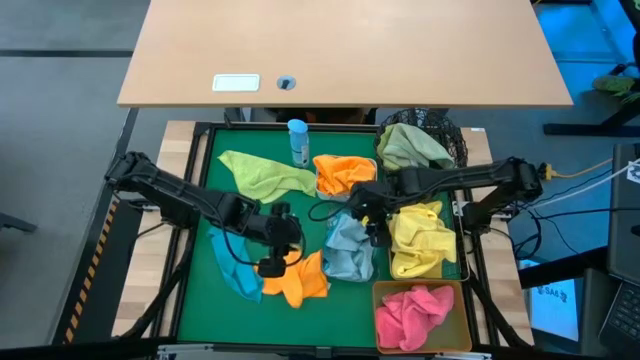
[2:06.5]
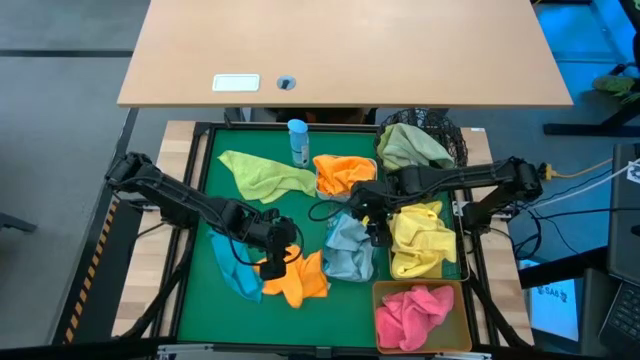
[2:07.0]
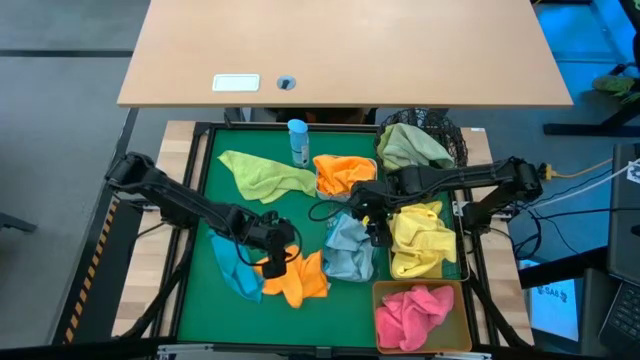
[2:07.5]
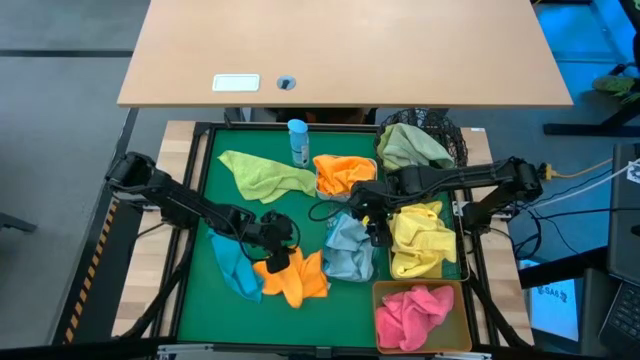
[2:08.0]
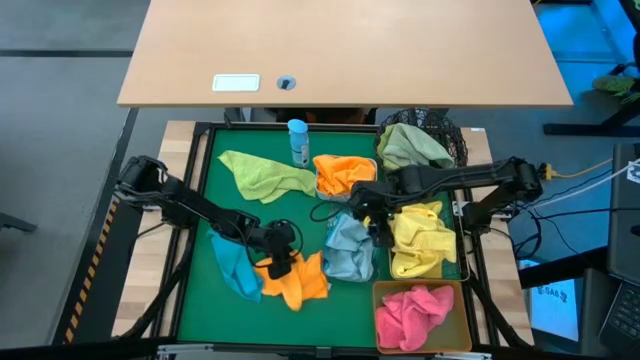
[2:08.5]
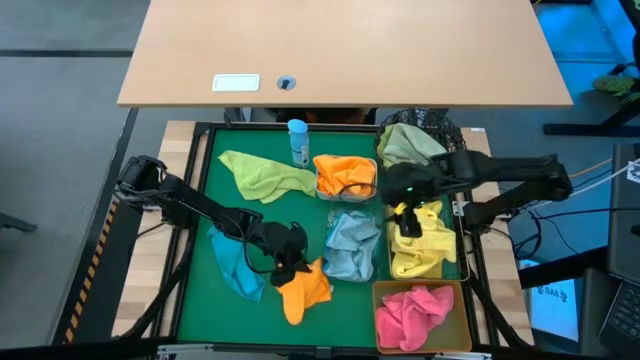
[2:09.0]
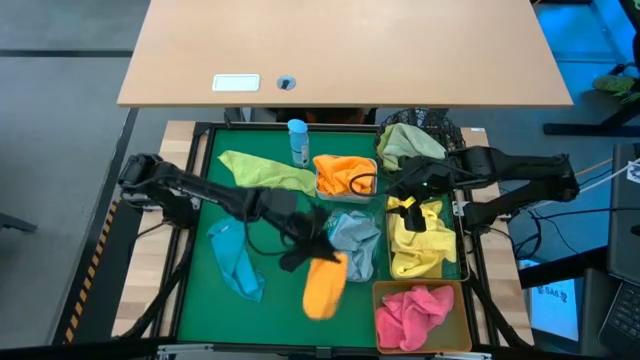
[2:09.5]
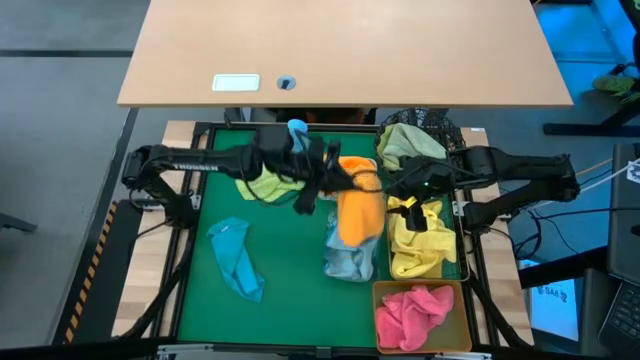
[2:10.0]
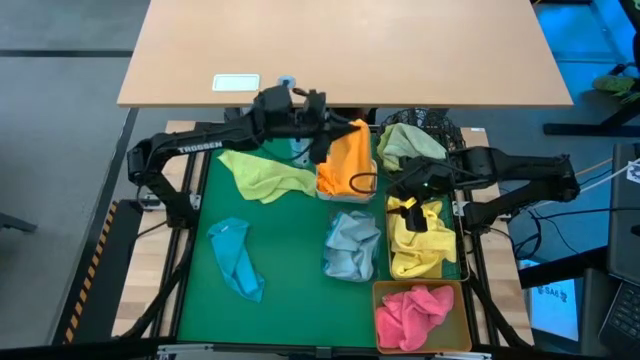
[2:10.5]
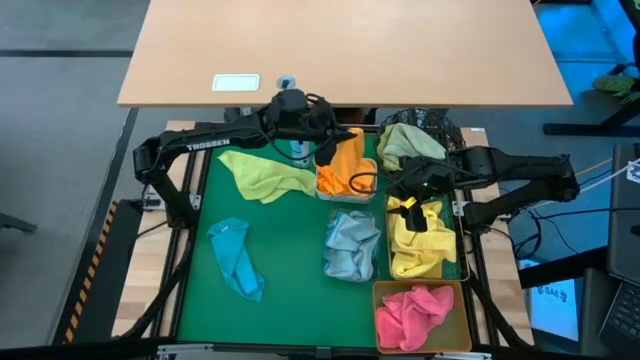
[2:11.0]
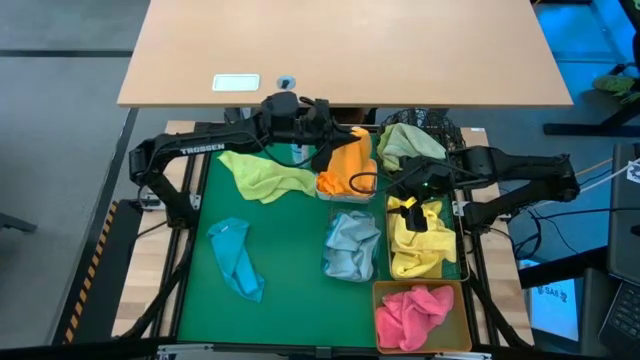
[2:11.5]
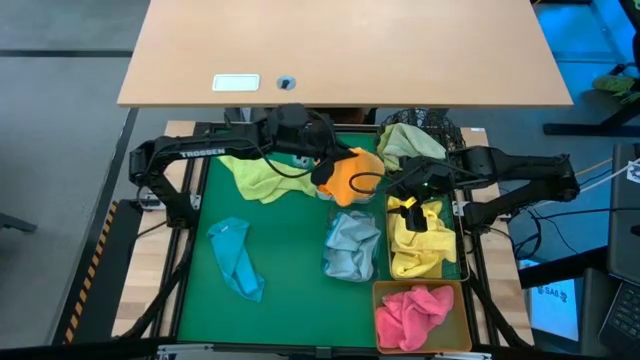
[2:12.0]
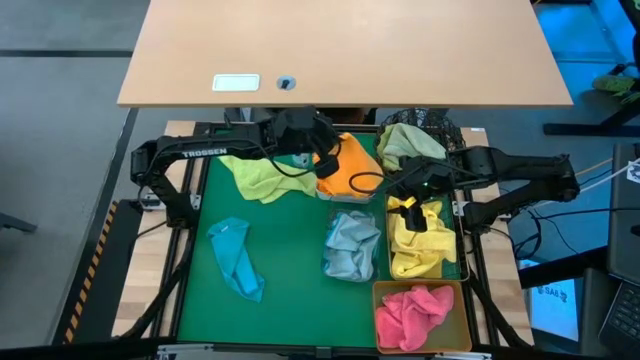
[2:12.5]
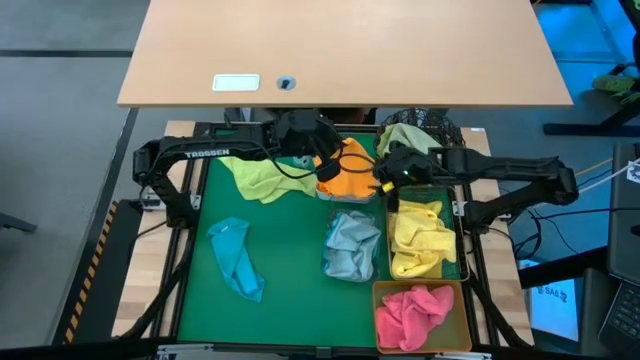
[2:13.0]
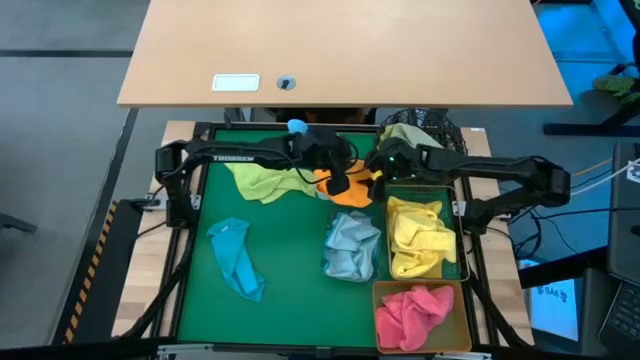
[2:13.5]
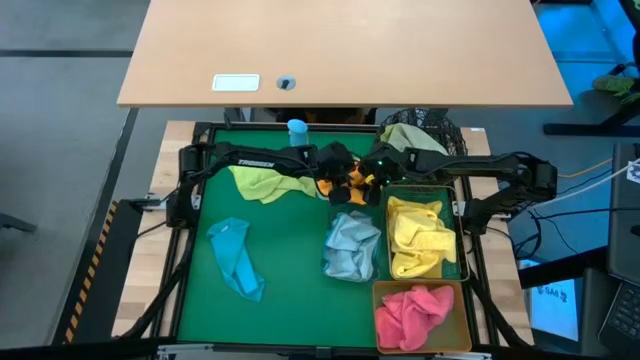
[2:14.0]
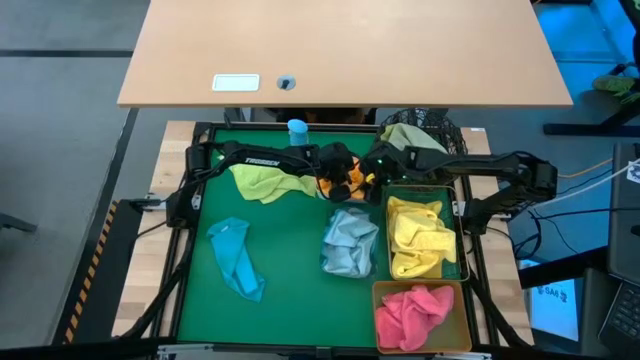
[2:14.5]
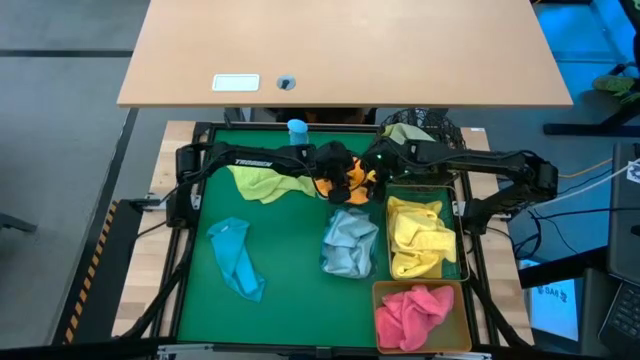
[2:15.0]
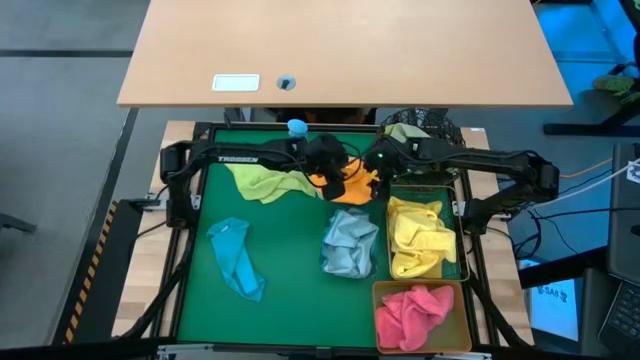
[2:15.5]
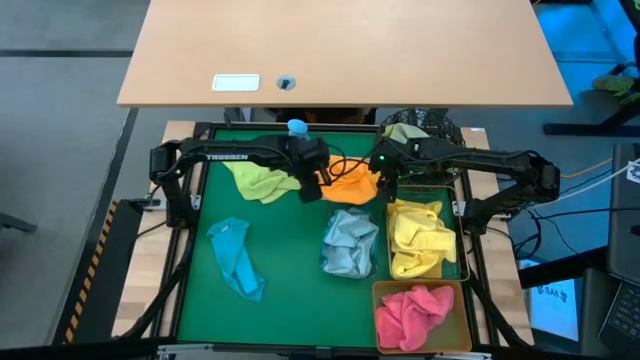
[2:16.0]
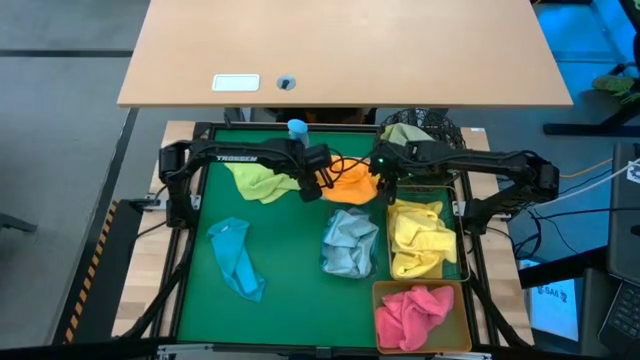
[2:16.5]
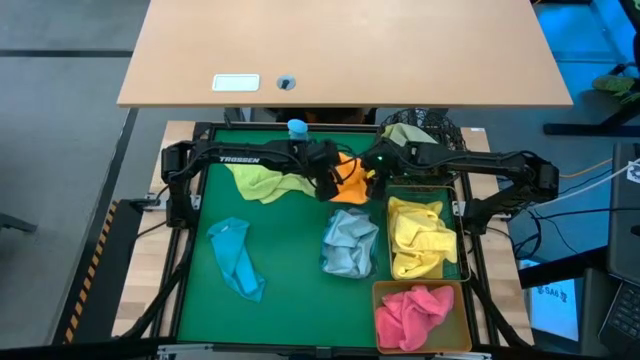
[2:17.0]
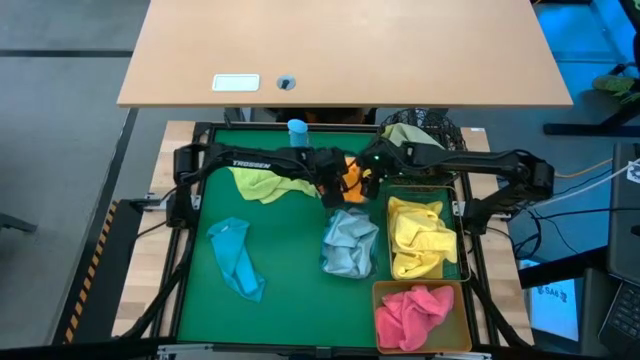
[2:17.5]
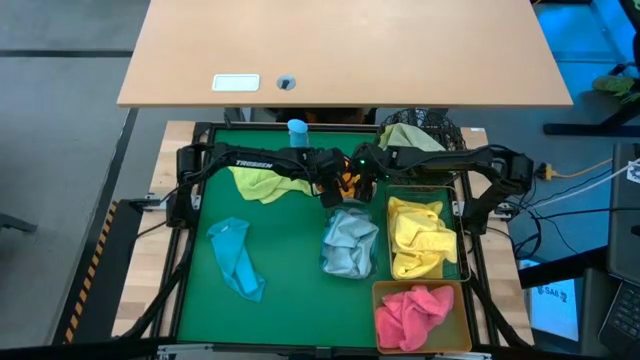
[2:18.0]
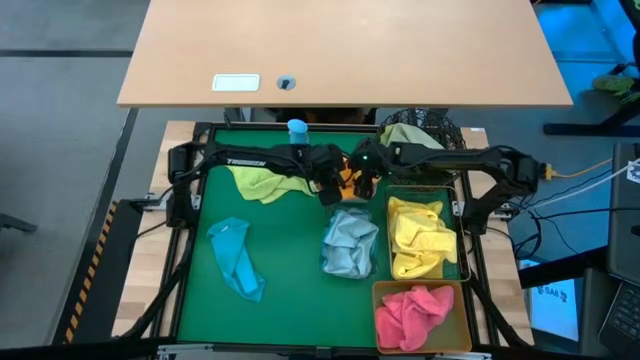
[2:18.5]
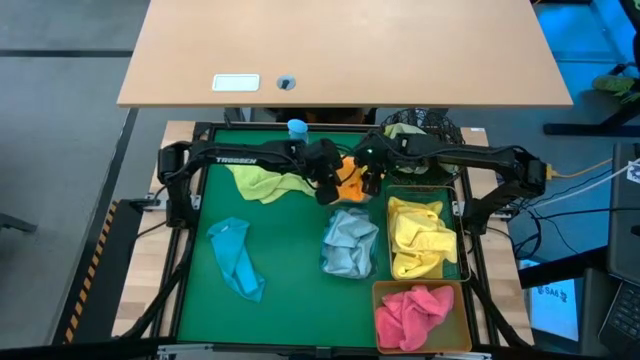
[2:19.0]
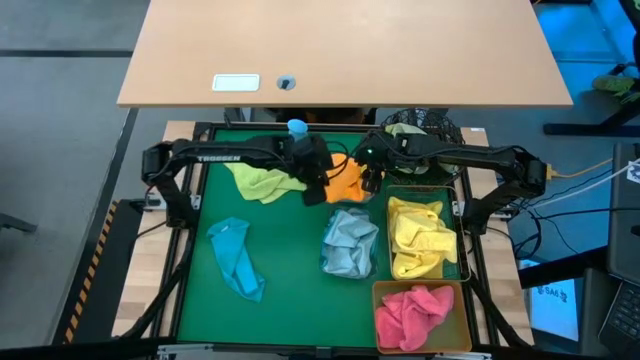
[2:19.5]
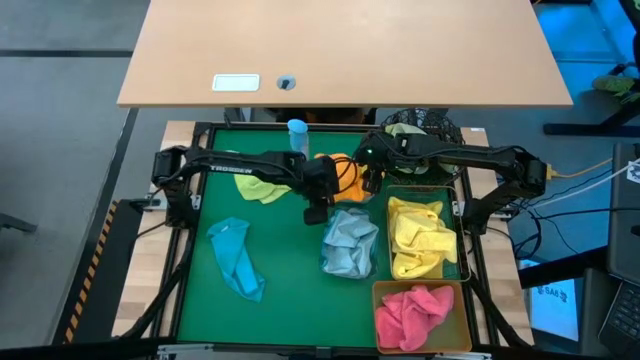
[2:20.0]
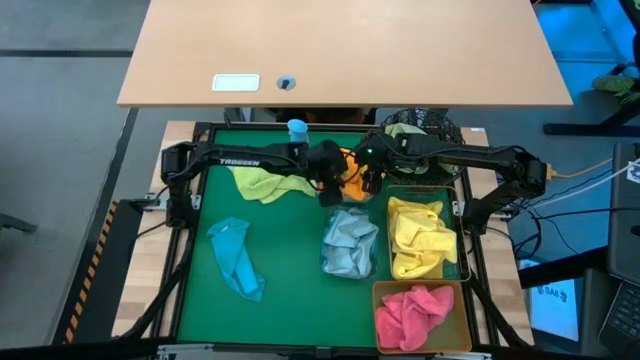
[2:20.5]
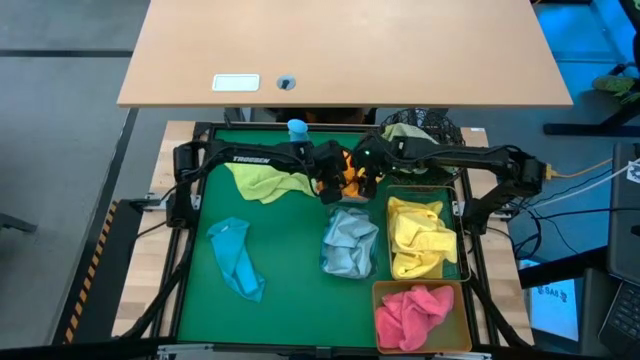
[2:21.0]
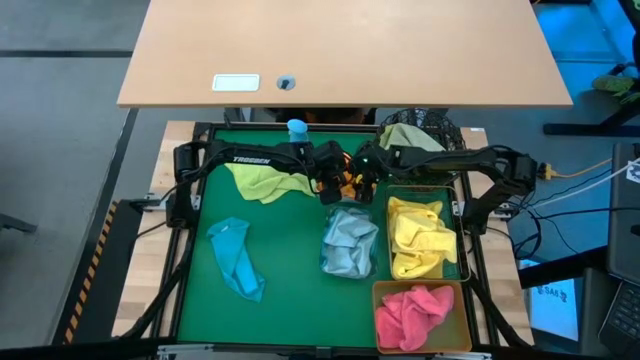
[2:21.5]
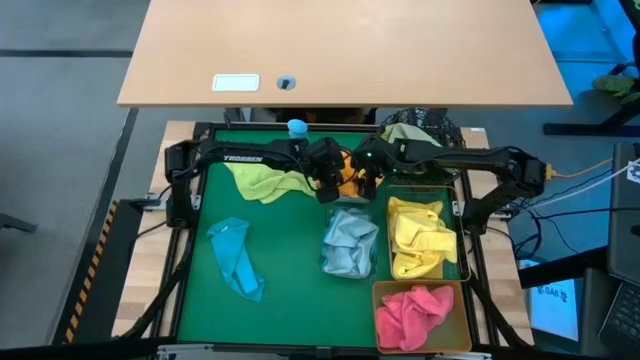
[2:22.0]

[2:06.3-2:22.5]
Task: Sort microfiber towel by color & place in baskets
Put the orange towel into the white bin

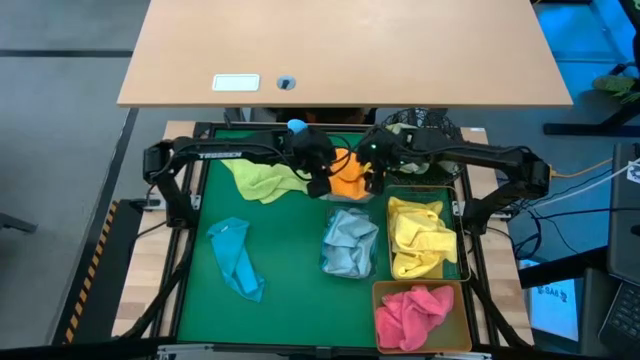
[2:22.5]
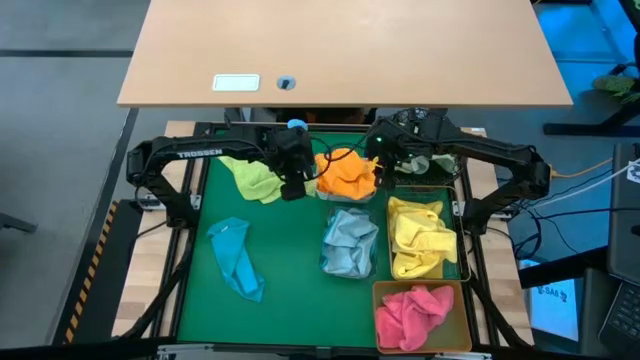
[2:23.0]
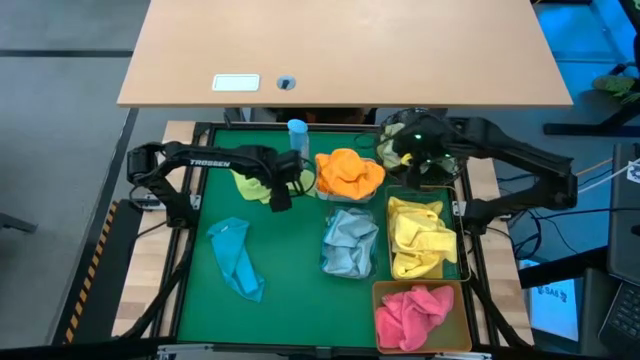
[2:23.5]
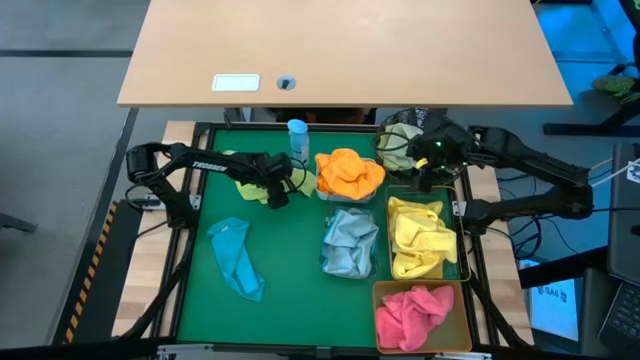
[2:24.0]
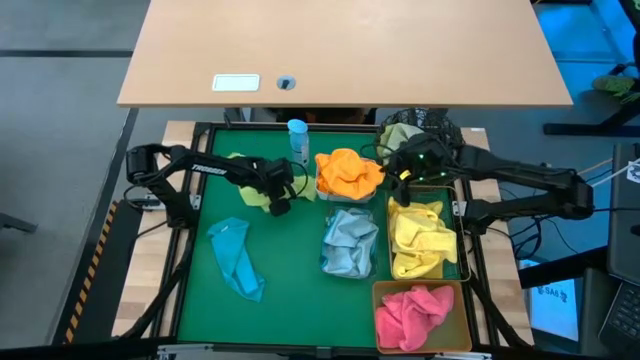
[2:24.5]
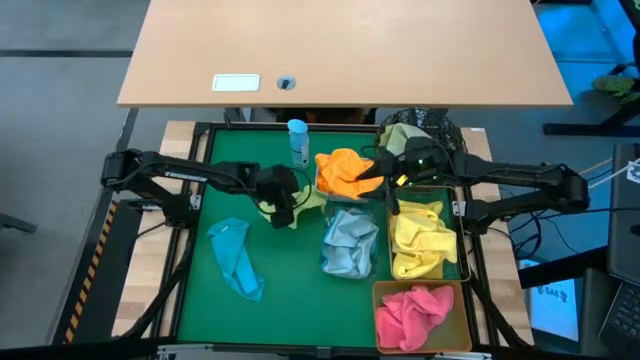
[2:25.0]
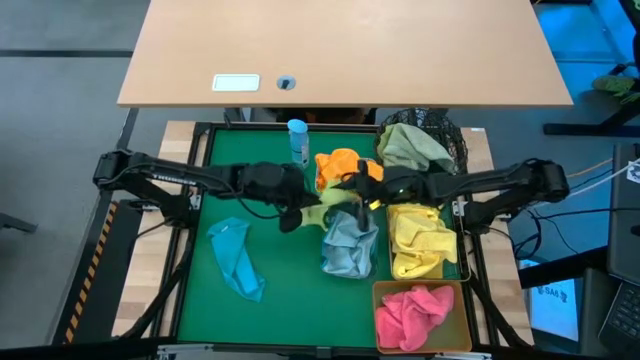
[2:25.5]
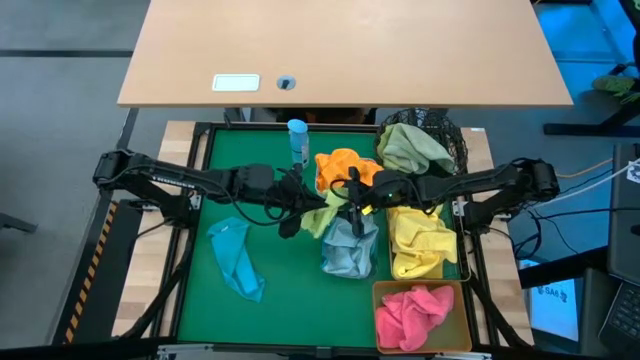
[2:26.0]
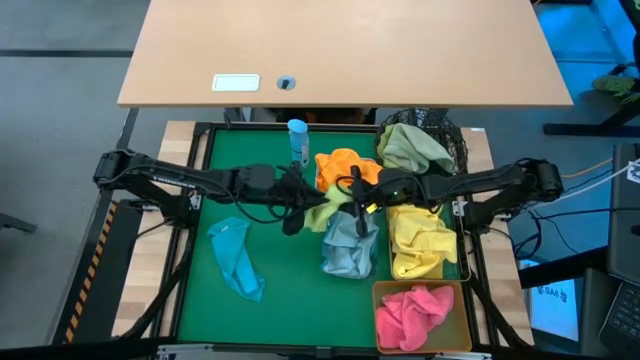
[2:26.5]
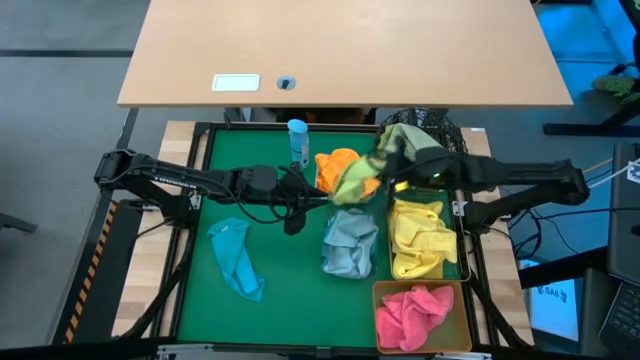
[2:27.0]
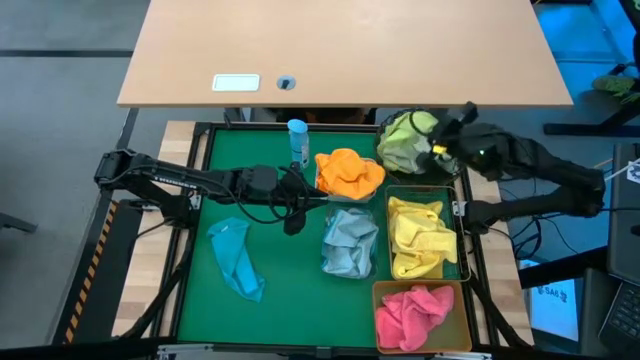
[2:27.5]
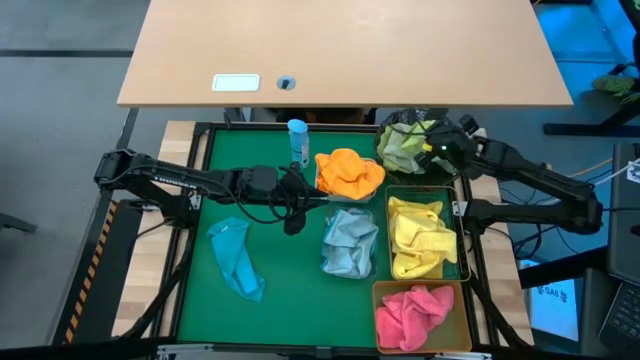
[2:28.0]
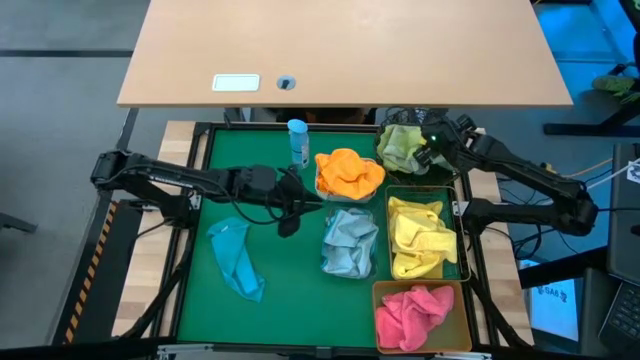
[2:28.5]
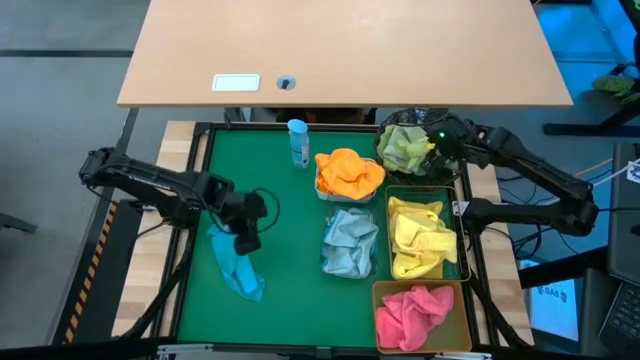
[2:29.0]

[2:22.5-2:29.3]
Put the green towel into the black woven basket
